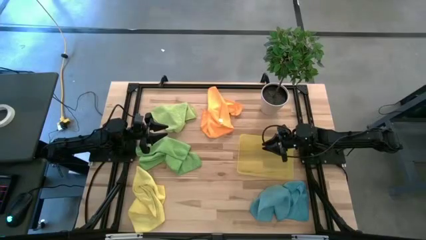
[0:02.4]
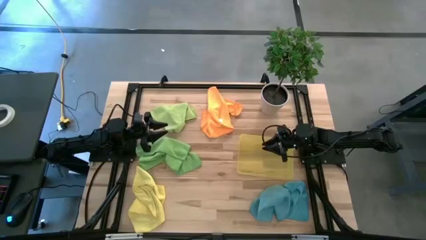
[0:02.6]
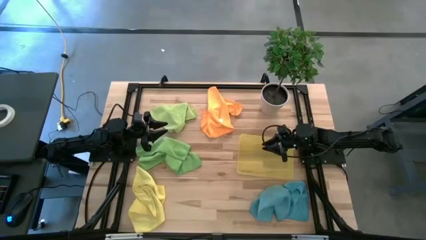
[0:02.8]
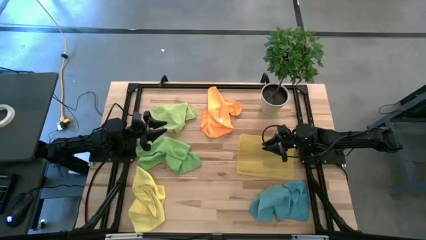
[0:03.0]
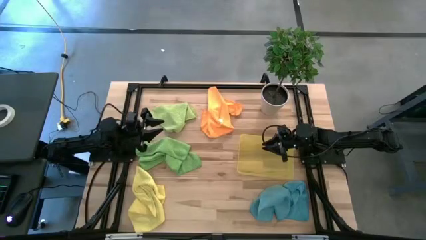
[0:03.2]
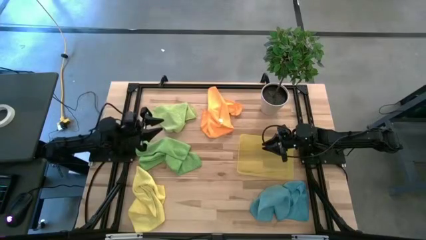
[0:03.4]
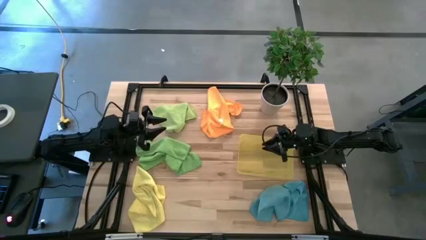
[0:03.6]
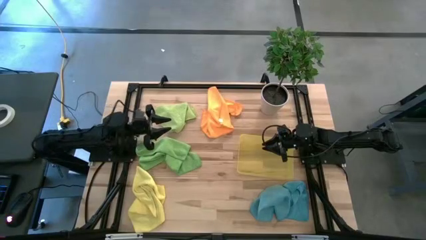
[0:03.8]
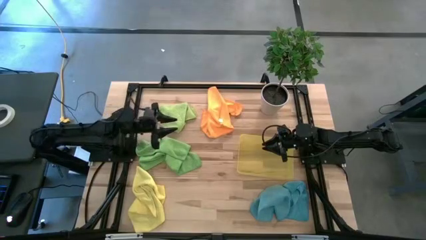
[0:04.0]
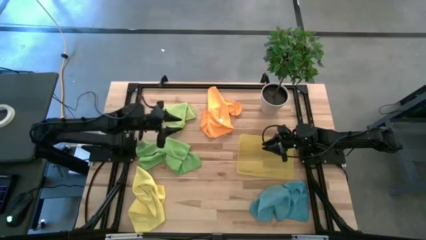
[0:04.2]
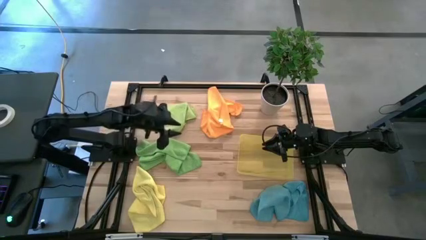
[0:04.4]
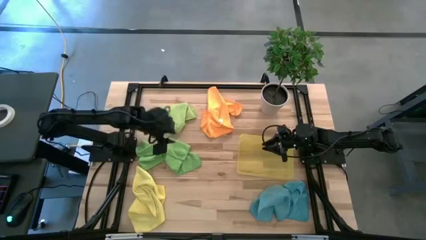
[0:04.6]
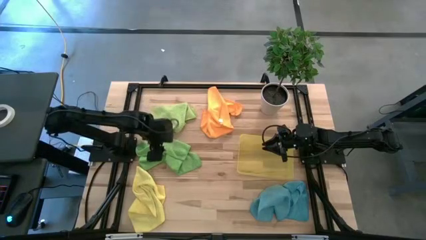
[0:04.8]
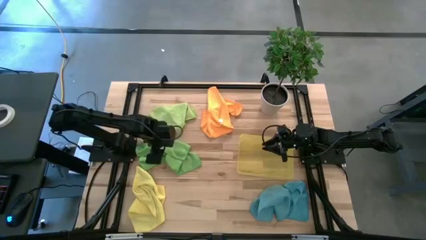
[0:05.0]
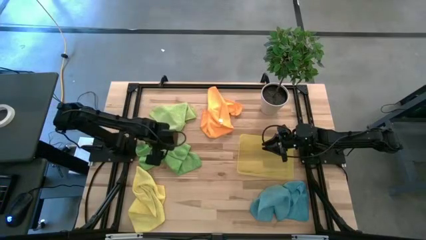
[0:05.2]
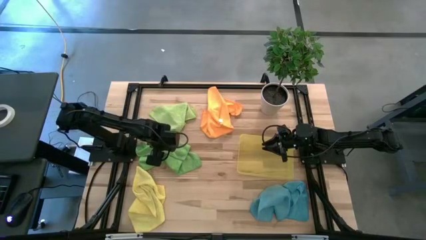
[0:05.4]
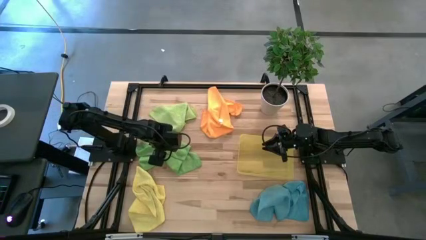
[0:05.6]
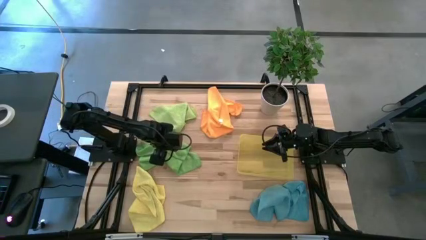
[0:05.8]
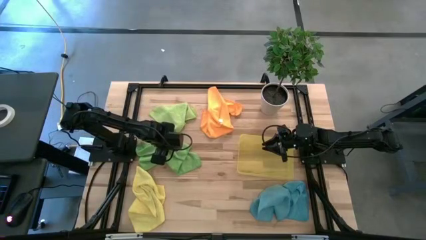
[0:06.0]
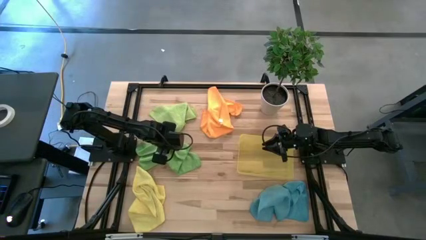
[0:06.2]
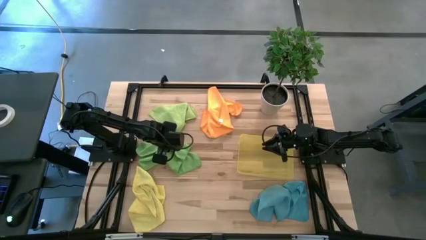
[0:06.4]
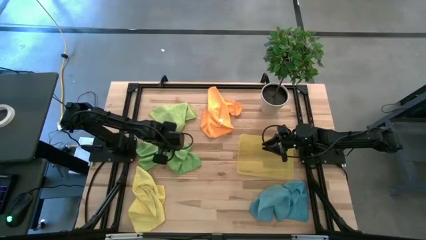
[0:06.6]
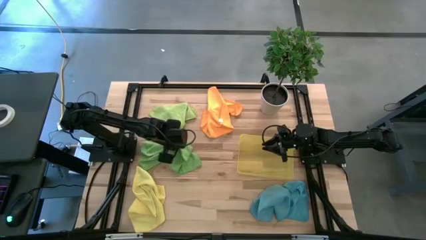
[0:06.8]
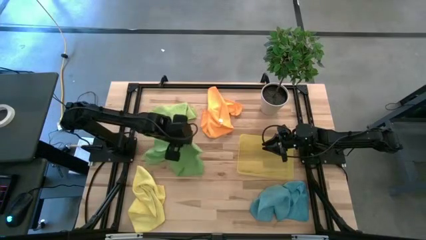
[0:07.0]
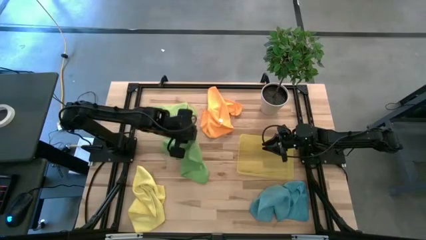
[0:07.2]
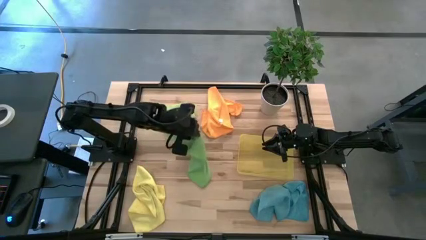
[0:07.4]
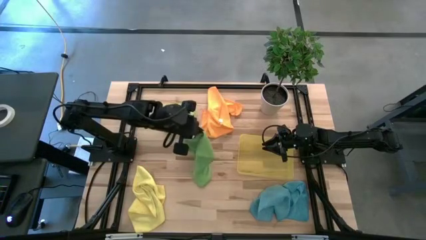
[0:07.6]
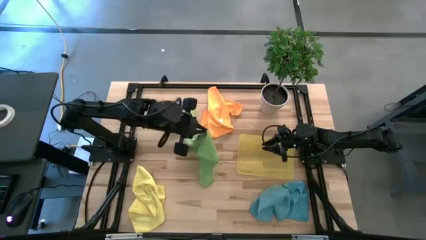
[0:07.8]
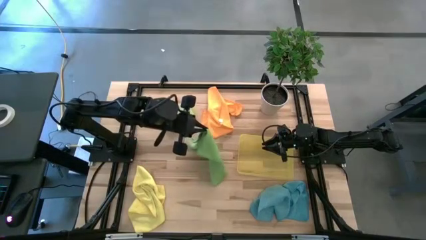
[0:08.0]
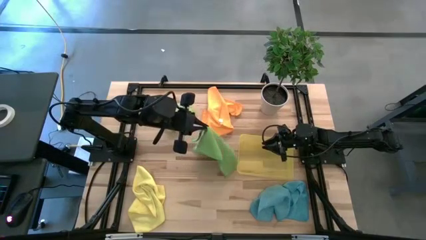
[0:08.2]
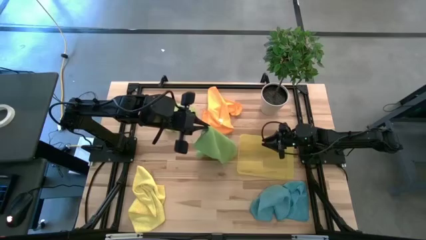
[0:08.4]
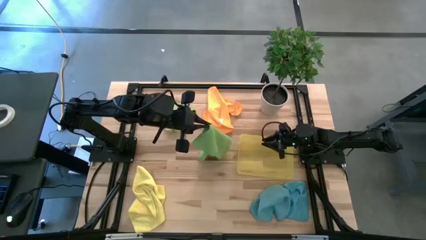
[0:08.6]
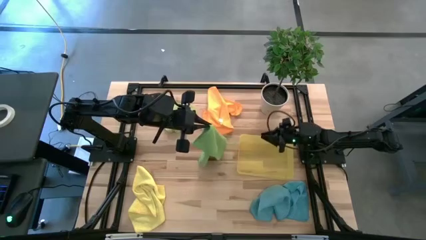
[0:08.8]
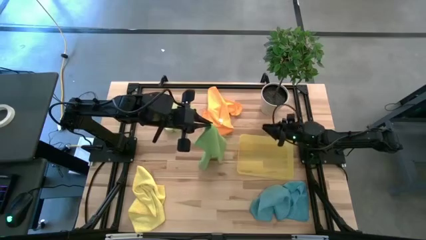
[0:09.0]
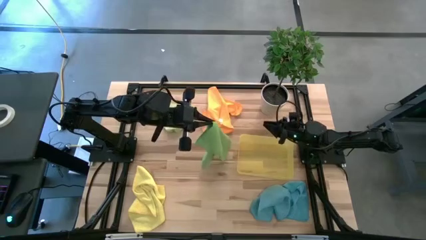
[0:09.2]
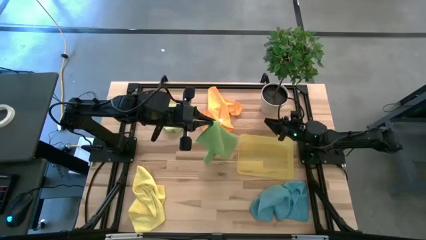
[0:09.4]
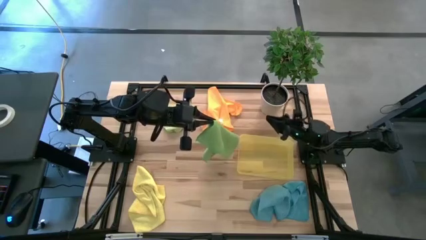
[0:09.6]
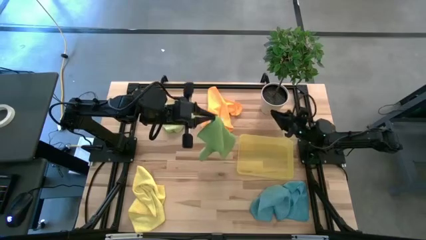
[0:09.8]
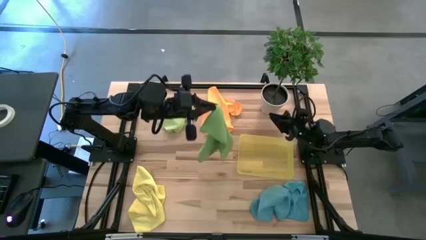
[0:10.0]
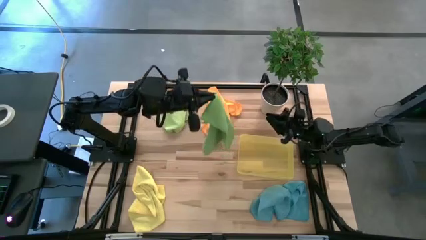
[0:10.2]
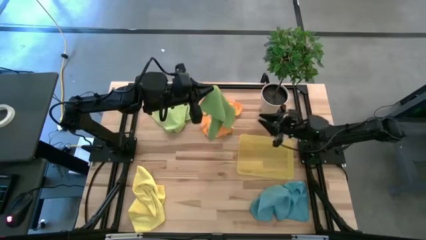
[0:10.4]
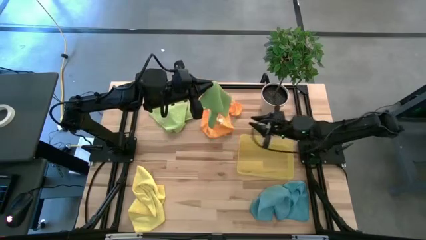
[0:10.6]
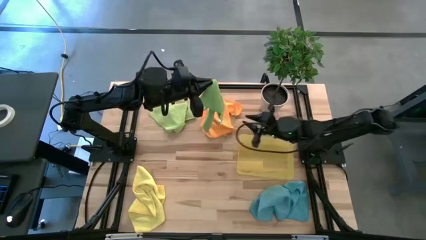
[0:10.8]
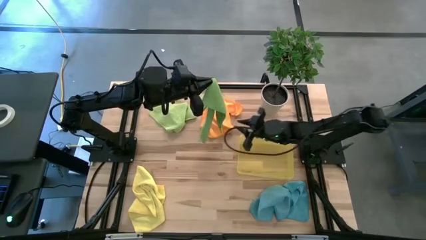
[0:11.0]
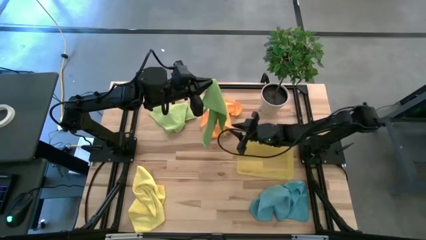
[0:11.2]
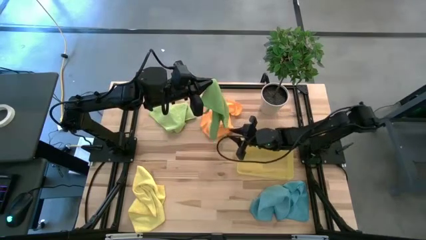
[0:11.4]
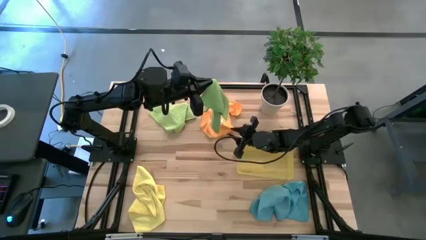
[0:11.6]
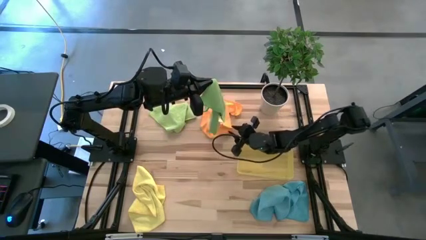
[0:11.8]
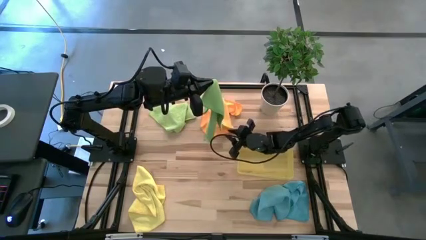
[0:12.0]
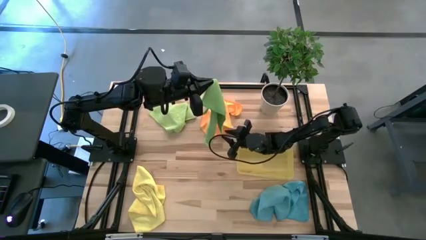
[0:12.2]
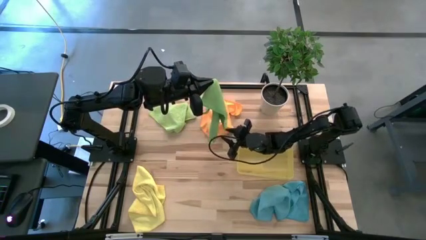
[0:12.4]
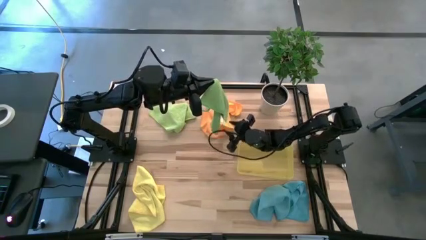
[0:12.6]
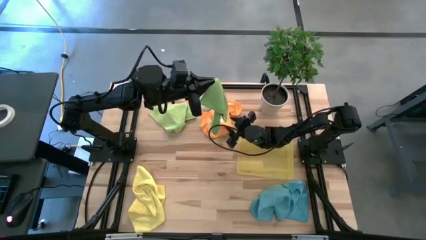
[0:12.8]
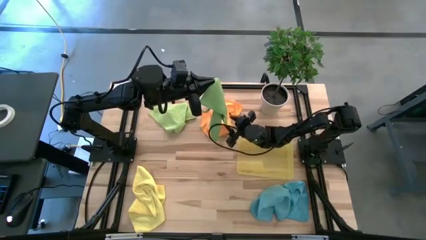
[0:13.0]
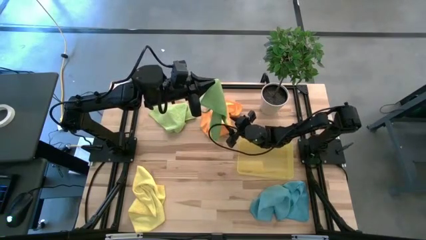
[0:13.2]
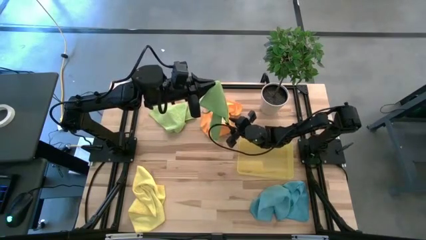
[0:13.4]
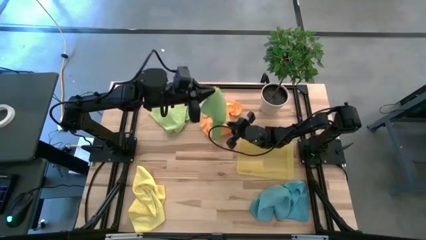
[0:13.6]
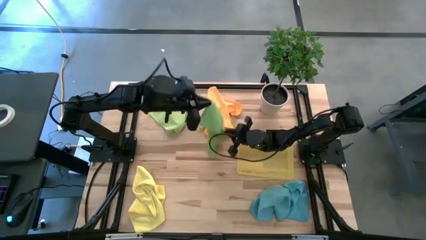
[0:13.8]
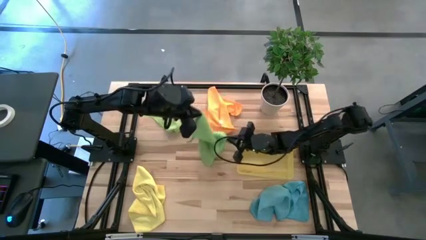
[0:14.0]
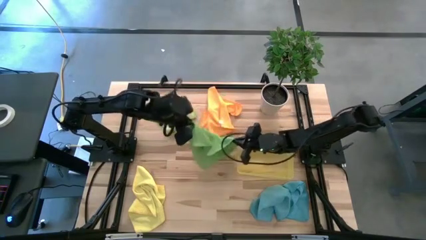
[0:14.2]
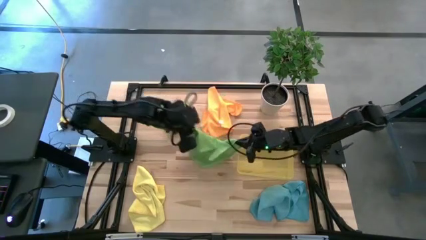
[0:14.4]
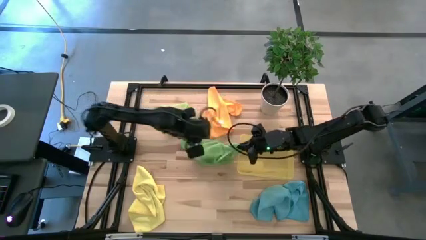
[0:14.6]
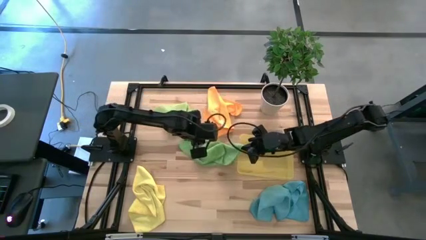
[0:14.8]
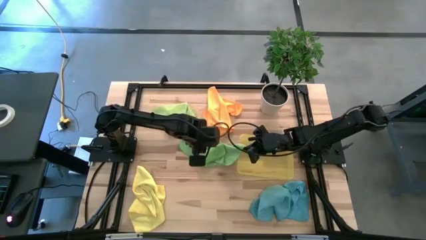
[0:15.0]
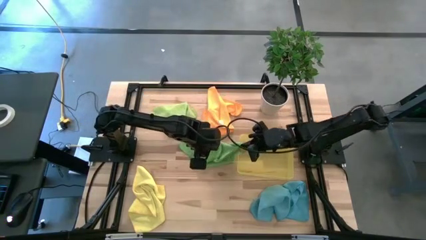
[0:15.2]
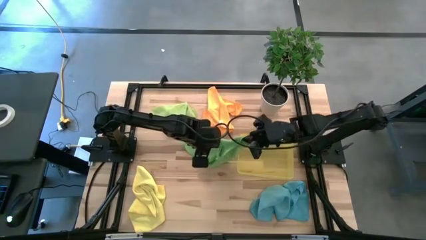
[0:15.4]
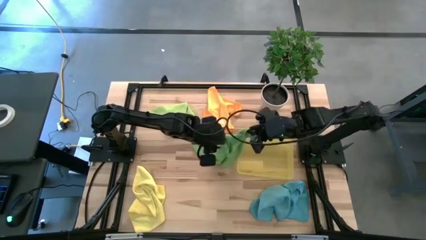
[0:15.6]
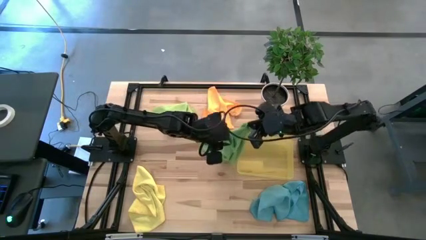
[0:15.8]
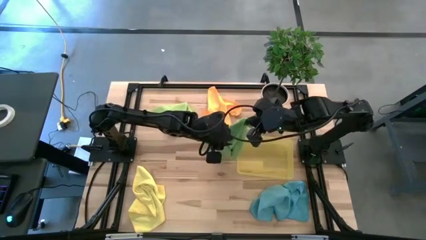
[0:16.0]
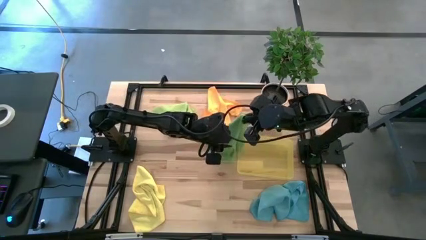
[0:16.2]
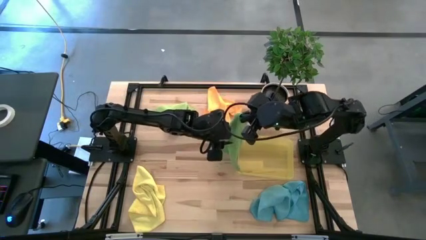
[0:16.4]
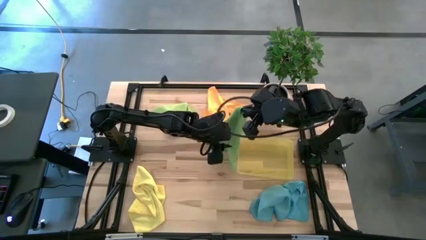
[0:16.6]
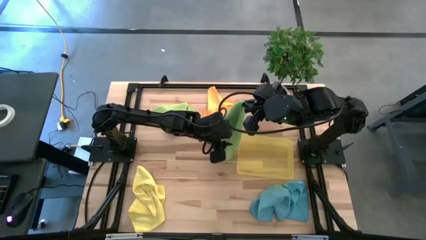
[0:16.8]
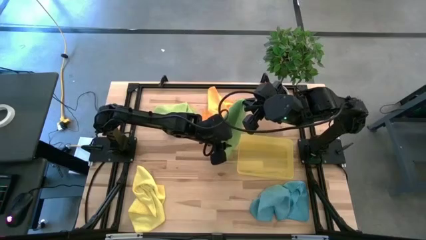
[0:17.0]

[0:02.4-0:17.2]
Task: Fold microfiber towels
Fold the bottom green microfiber cloth
